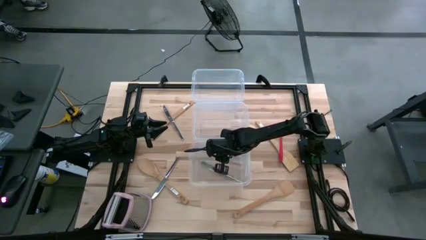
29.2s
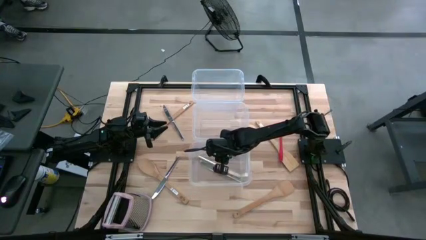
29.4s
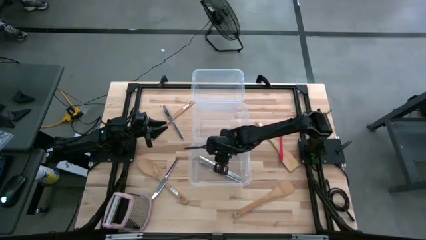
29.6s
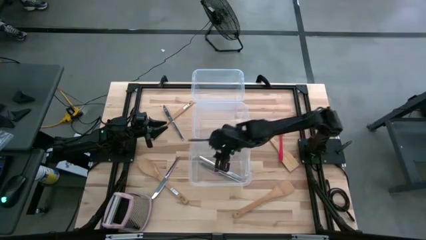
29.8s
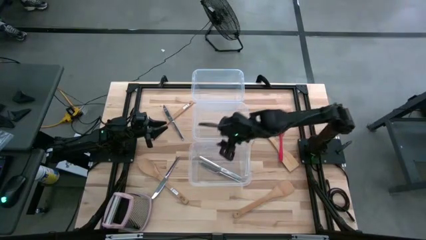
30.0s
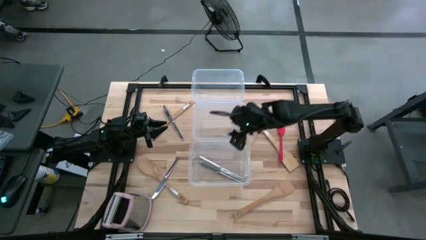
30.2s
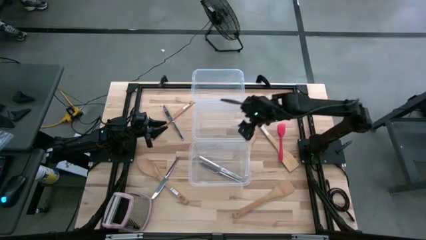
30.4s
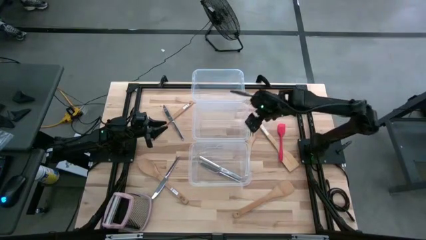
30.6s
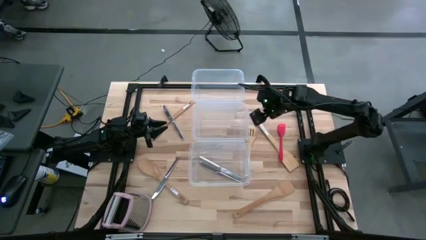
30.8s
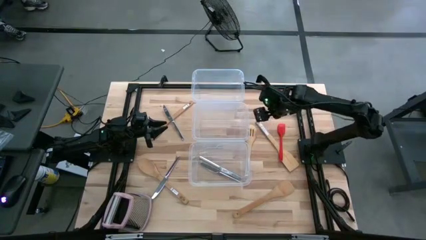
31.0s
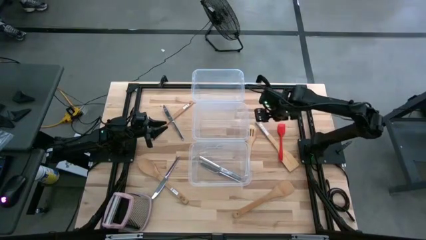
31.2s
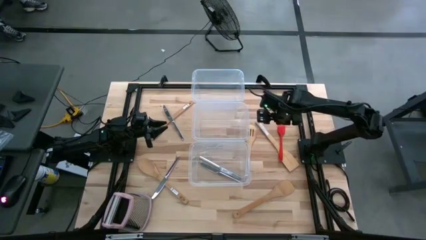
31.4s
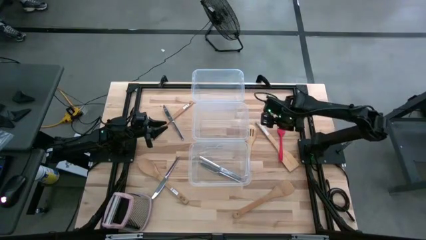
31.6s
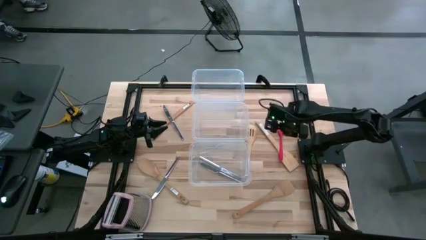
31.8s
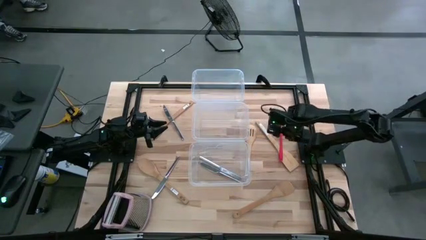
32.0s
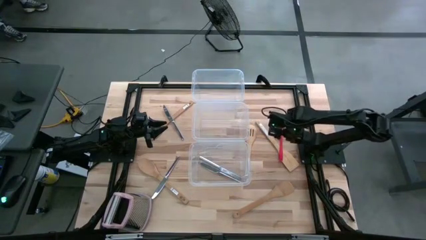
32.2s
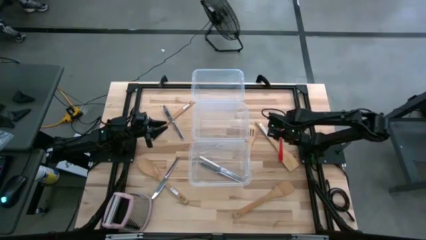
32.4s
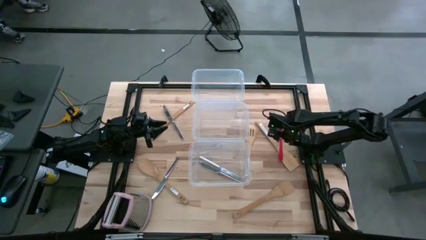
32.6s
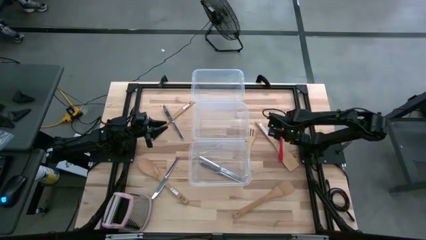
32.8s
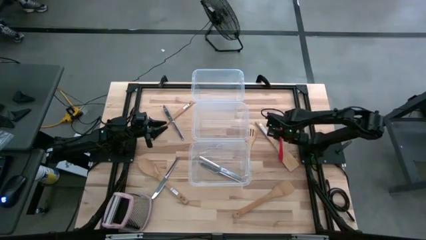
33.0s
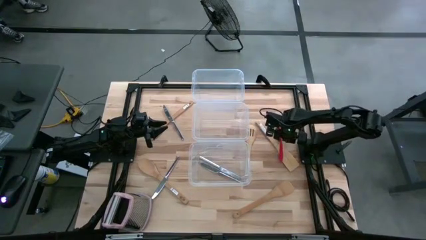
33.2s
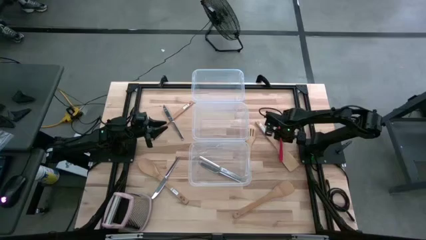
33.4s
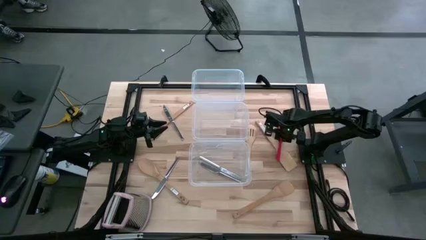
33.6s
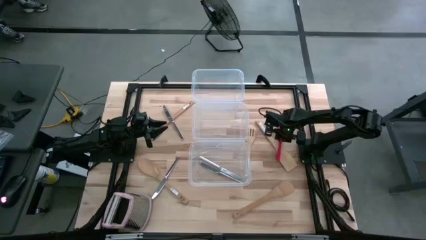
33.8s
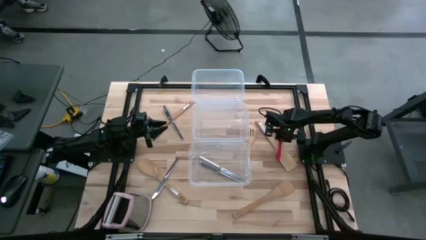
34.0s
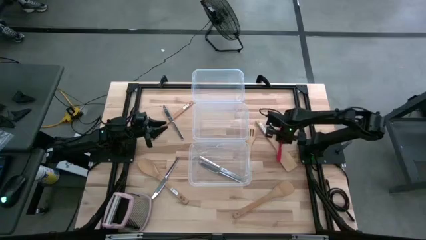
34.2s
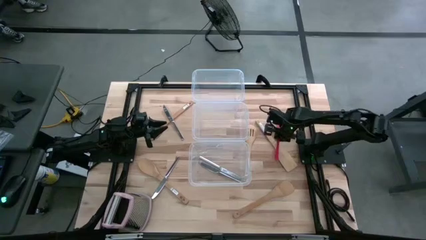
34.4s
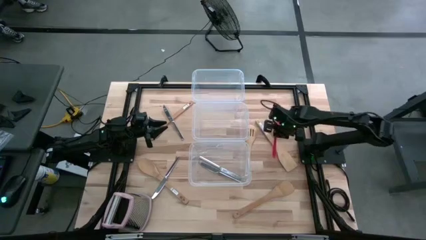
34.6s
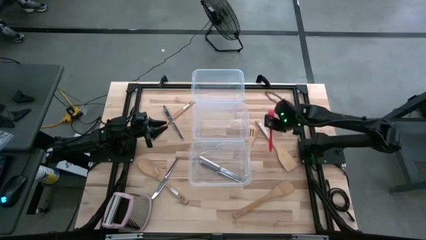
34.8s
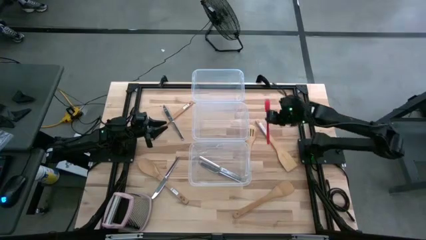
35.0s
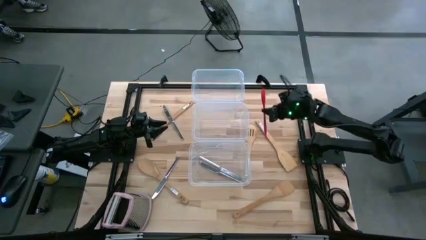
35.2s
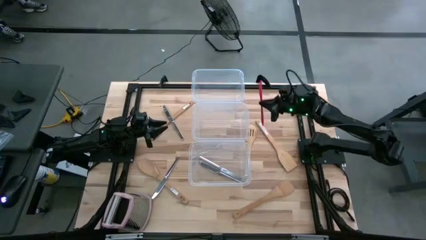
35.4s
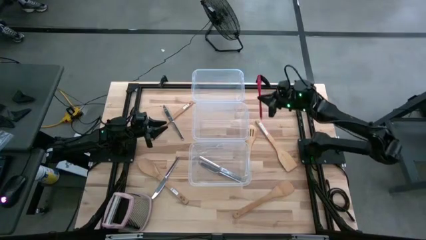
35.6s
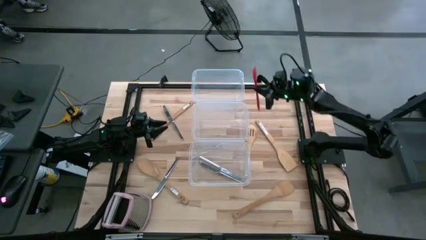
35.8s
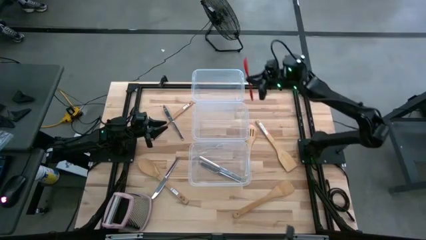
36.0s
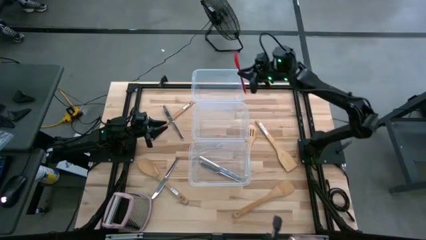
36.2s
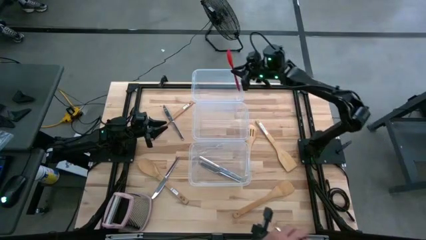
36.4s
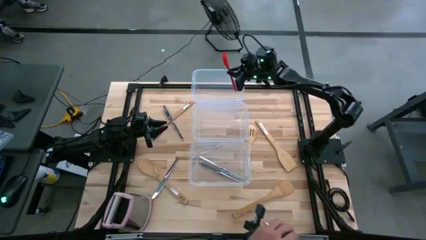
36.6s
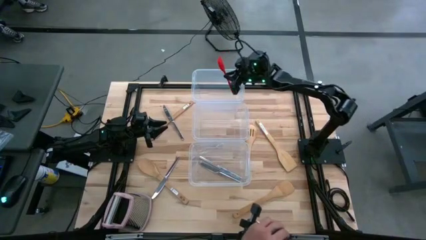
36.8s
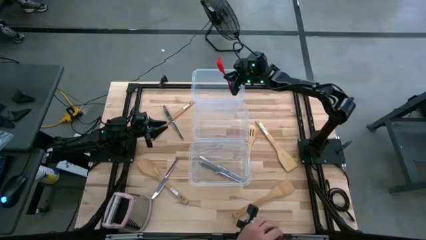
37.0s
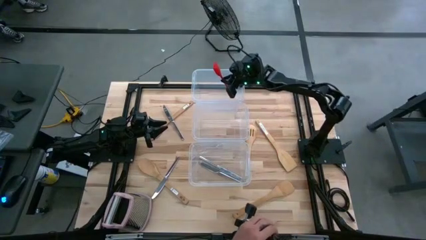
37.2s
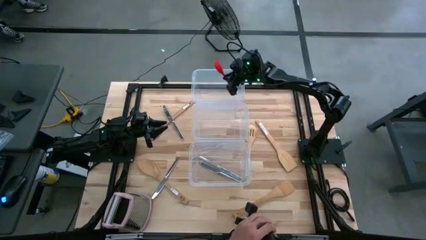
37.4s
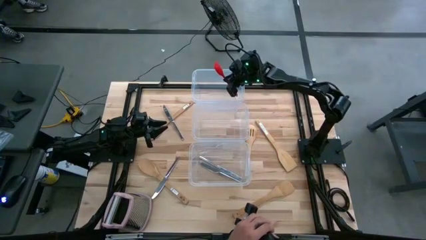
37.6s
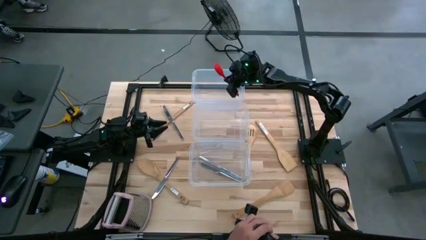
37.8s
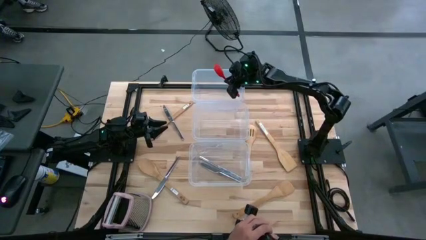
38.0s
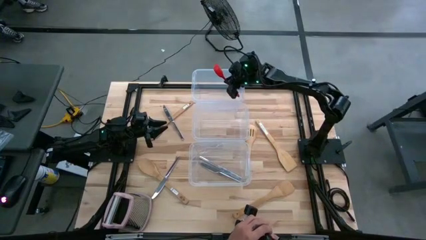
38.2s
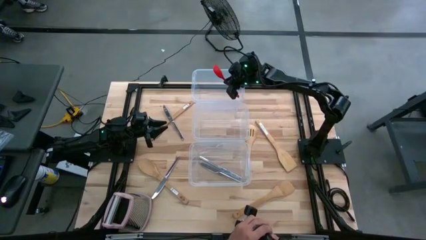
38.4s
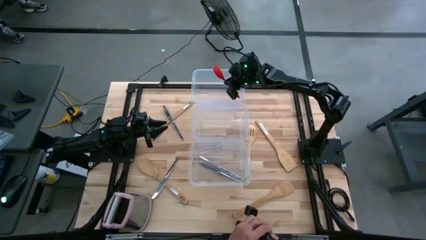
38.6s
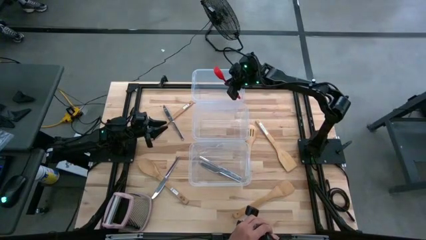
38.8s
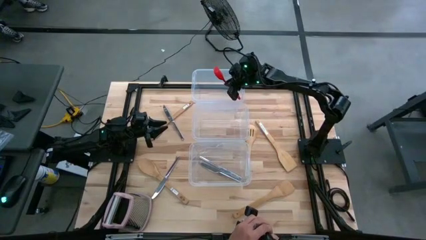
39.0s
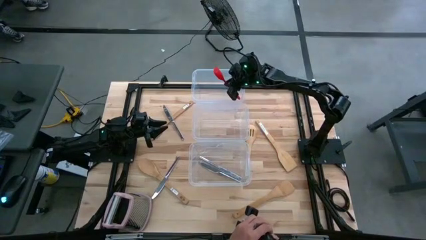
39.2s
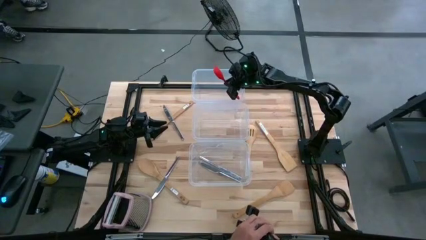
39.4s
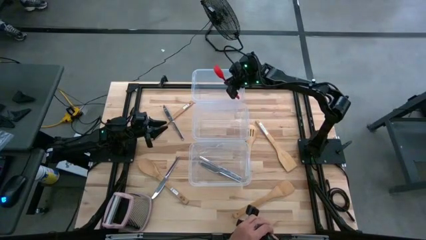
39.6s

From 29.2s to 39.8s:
Task: Pick & Place Kitchen Items
Put the red spatula into the top transparent bin

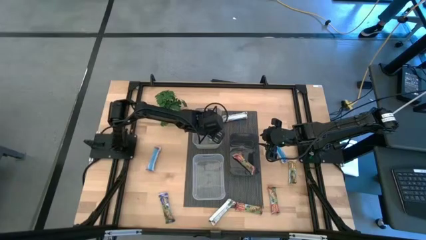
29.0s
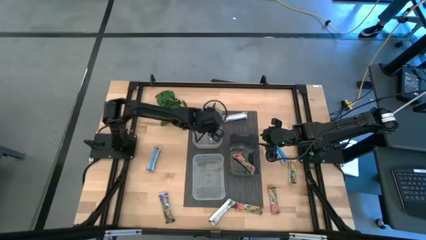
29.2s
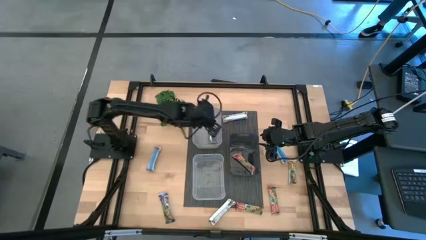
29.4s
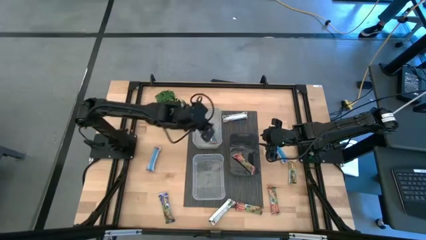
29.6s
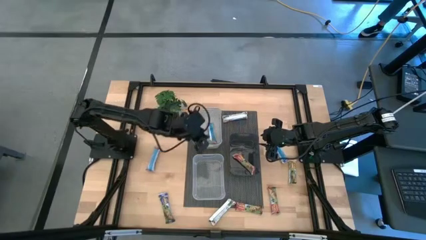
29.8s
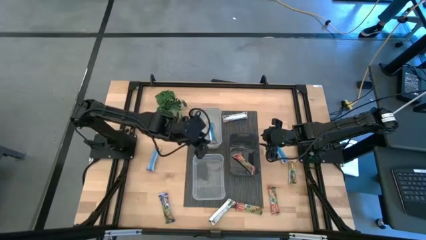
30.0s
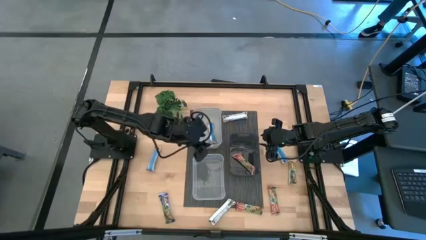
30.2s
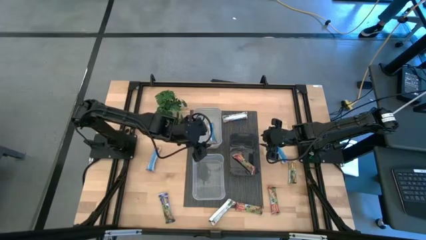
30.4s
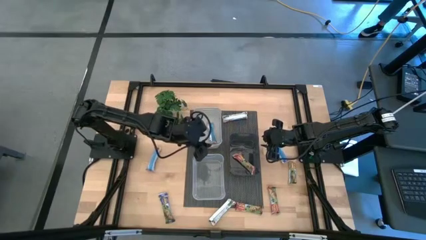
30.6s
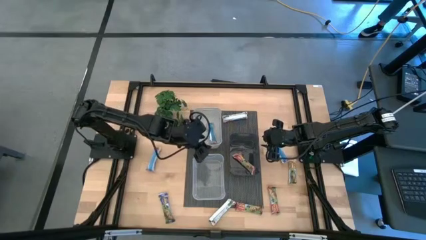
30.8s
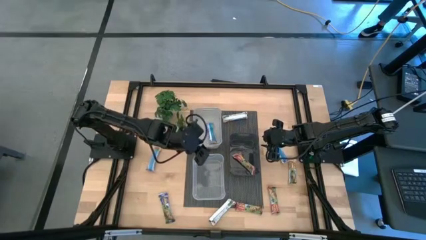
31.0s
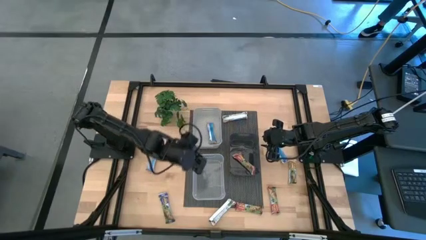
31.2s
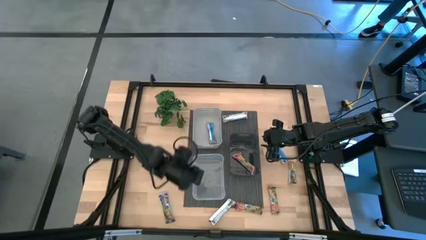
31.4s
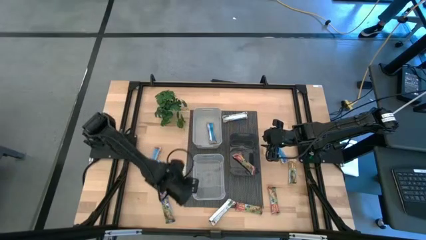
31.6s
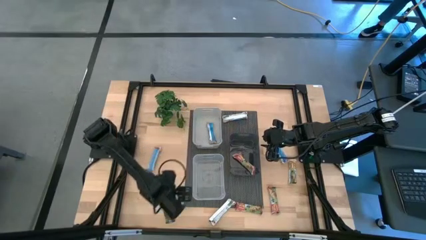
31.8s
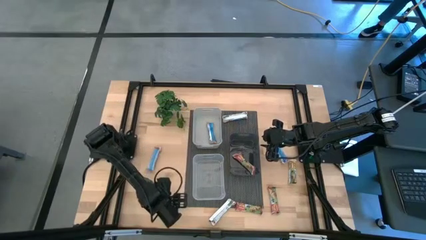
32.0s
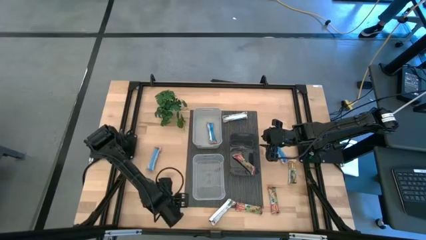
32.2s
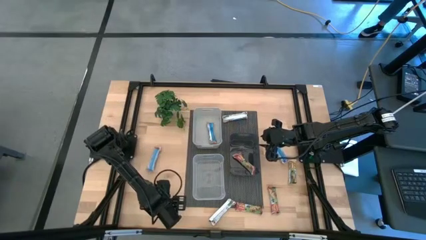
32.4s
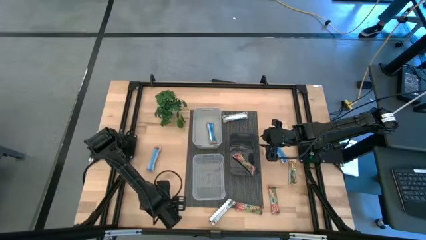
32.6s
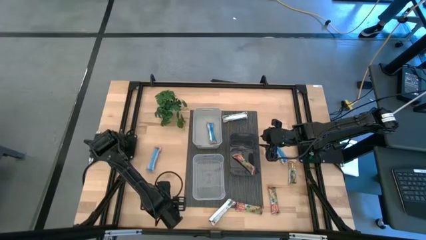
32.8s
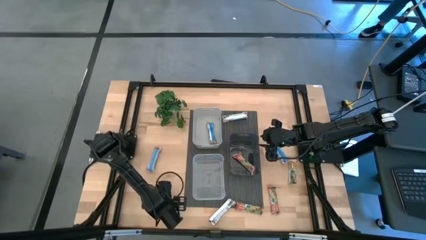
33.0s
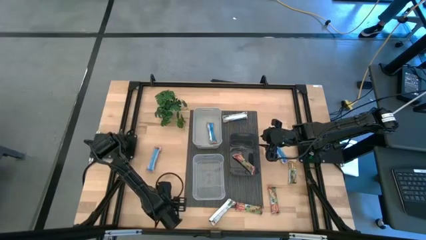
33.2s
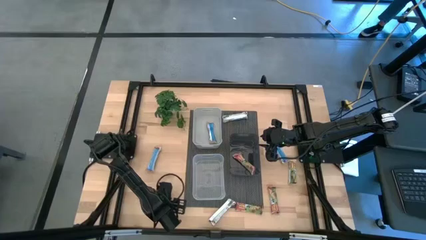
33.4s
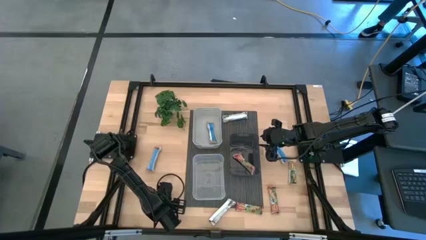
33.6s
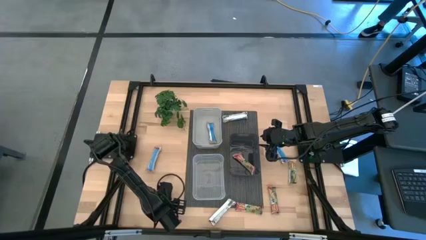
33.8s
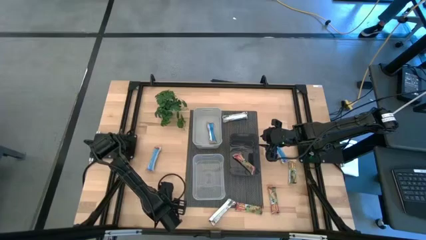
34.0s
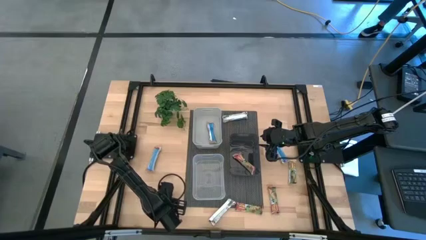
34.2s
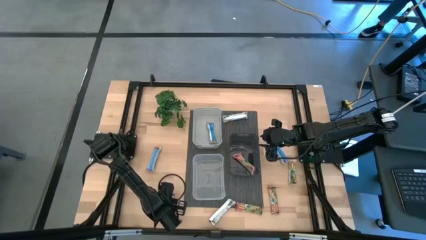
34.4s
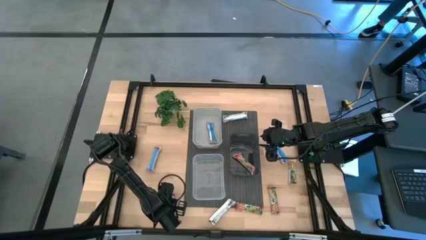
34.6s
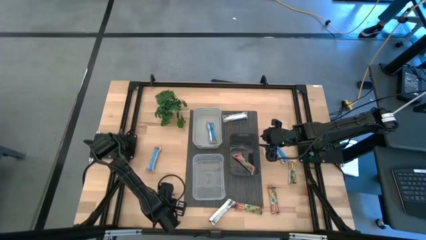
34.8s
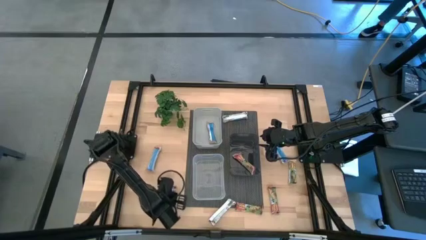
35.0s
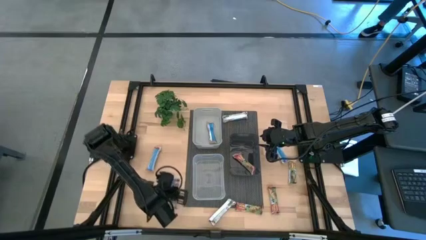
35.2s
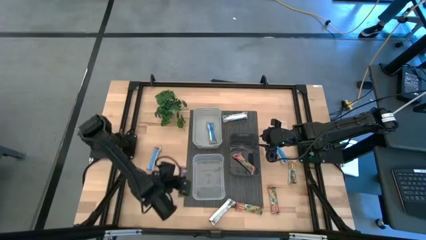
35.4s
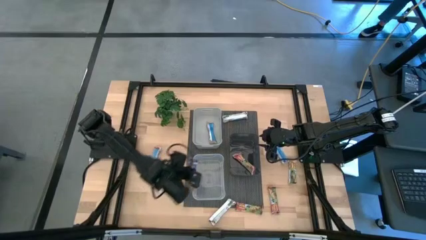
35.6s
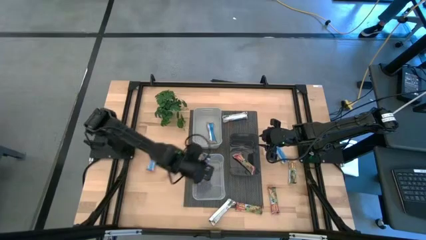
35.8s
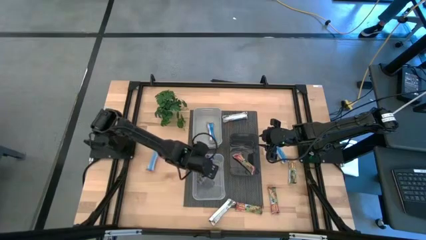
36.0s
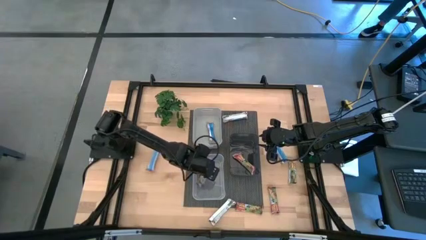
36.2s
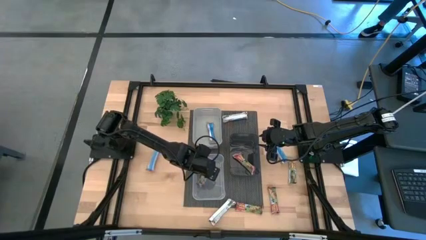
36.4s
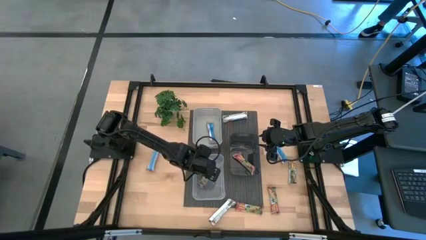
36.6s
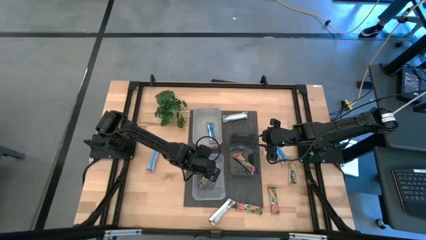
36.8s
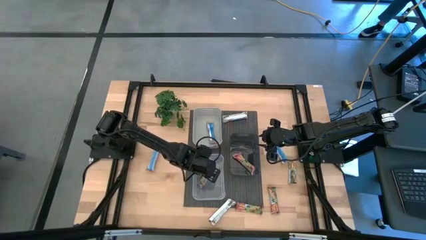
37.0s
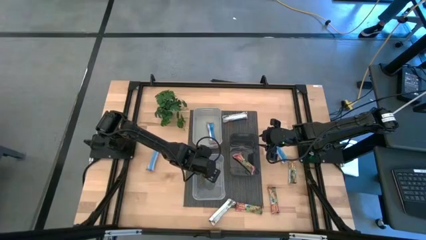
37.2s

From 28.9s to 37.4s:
Task: Pick and place Granola Bars by type
Put the blue granola bar into the transparent bin
